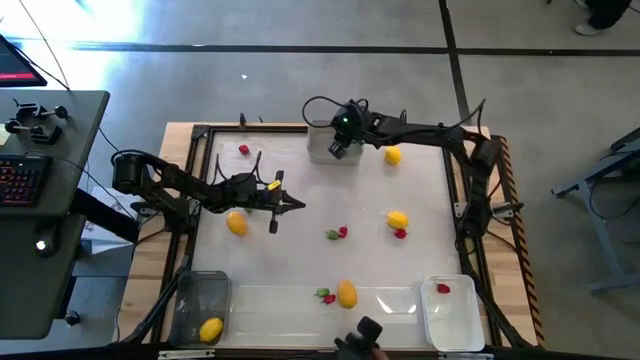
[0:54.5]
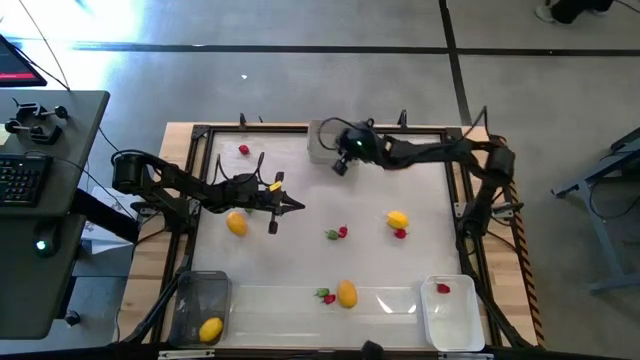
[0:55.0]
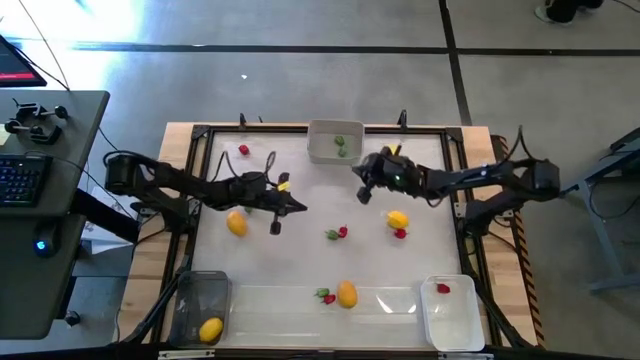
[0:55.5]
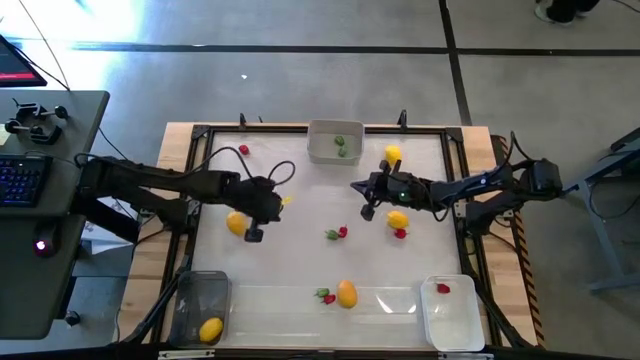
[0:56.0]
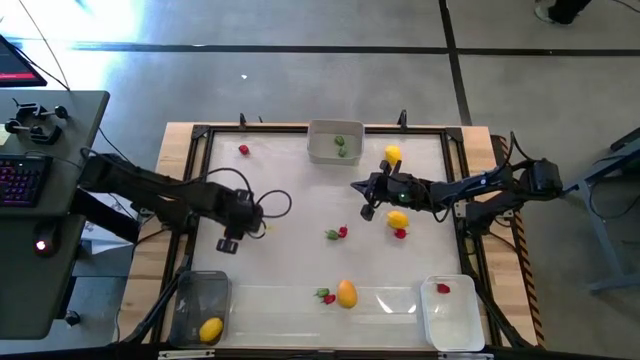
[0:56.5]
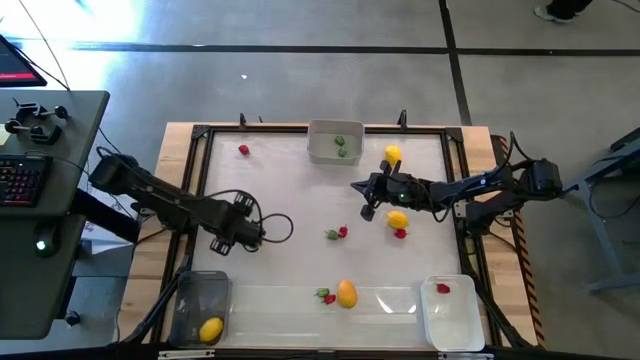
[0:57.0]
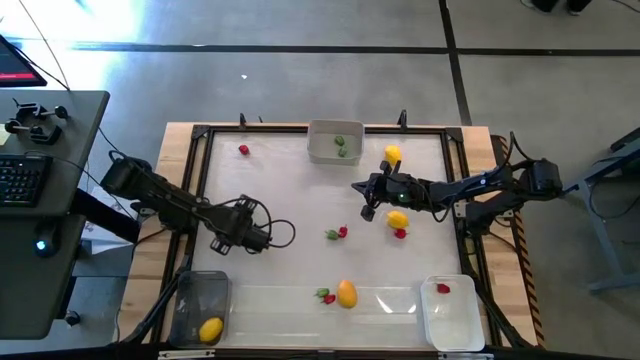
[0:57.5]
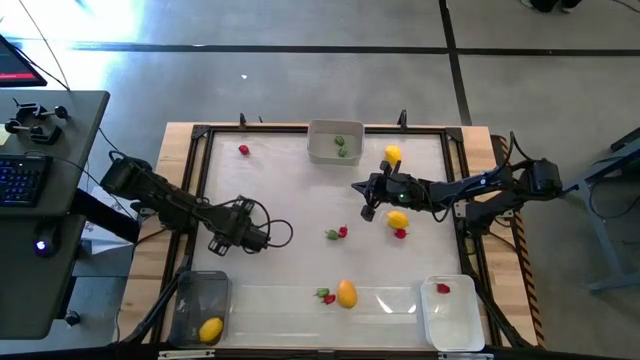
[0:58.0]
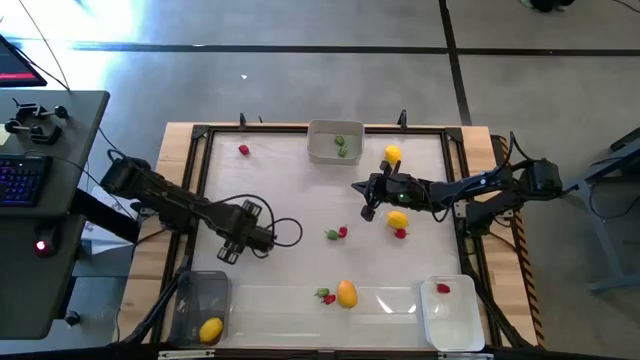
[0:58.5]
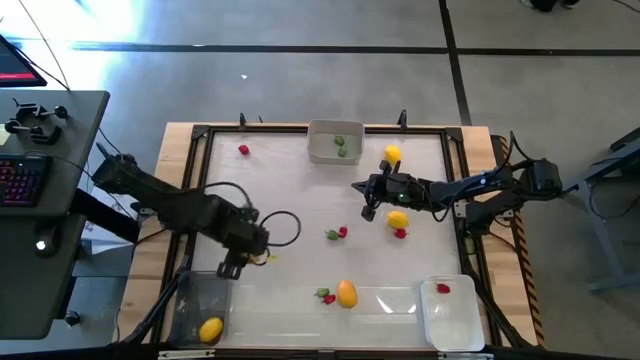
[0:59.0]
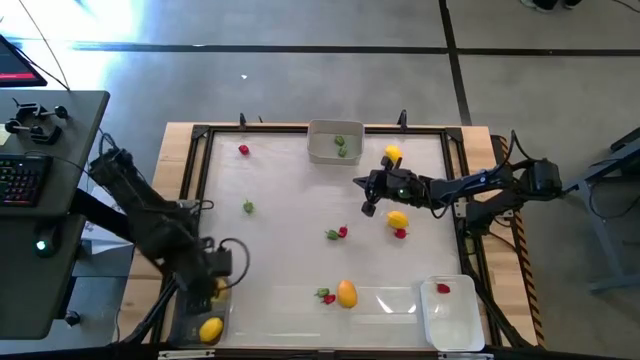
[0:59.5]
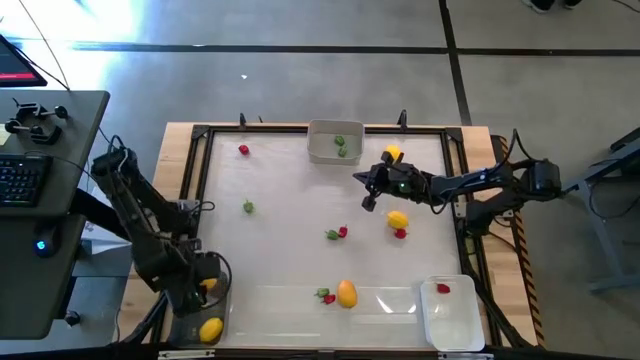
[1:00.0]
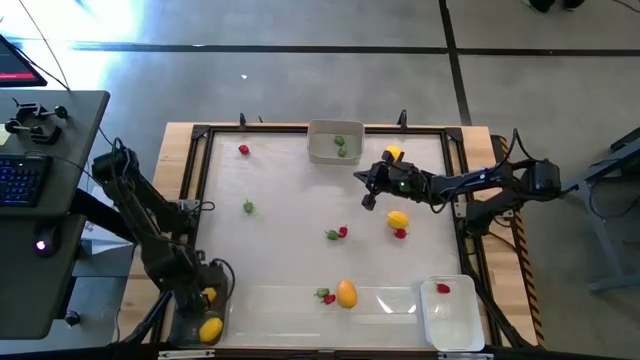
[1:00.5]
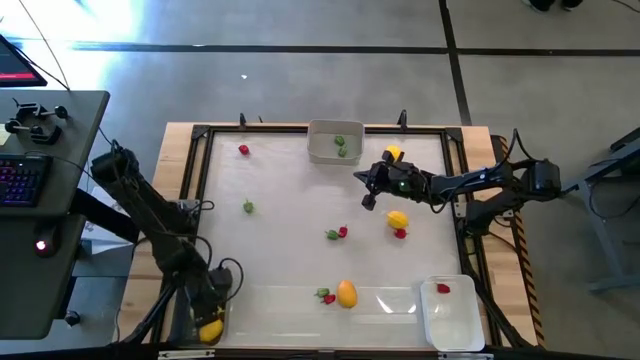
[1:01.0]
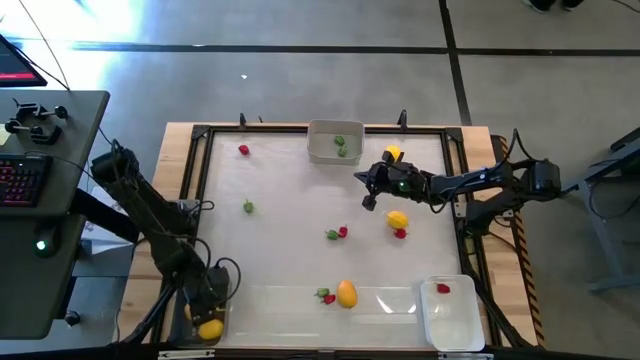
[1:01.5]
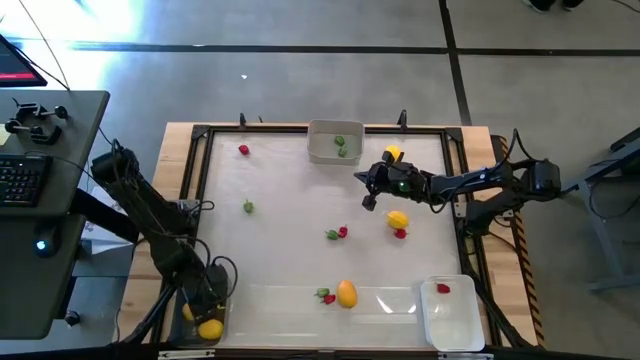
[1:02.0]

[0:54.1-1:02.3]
Task: Sort produce into baskets
Put the lemon into the black bin

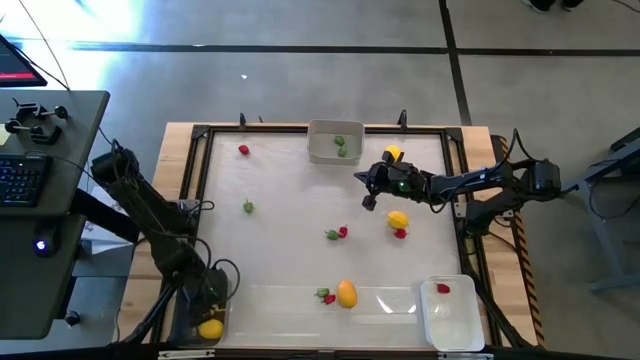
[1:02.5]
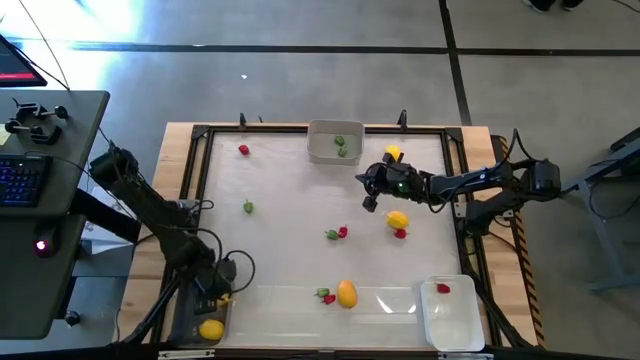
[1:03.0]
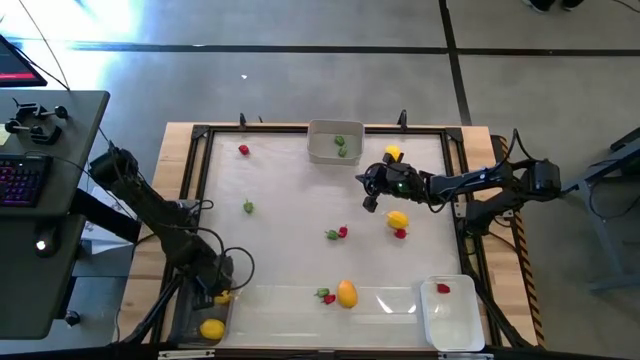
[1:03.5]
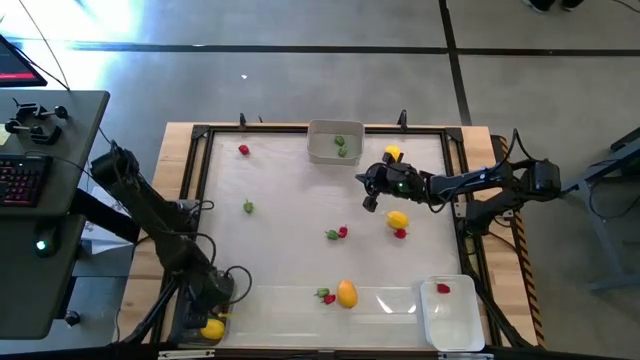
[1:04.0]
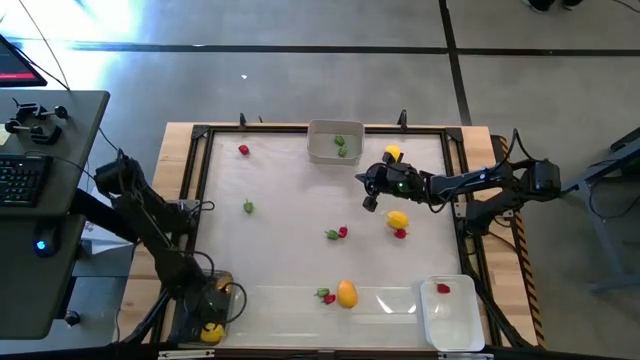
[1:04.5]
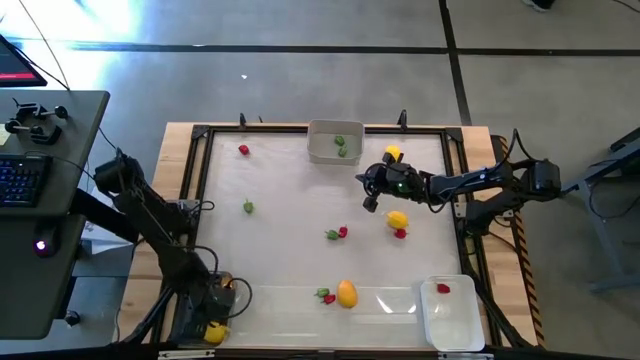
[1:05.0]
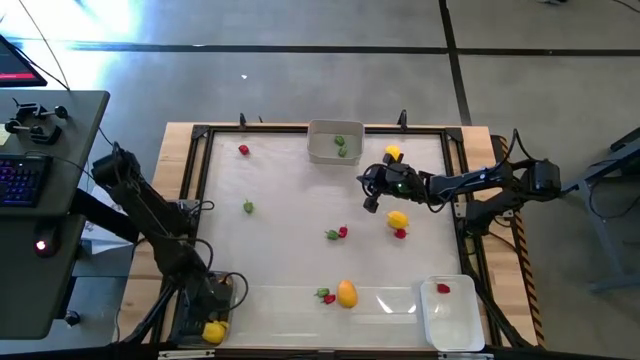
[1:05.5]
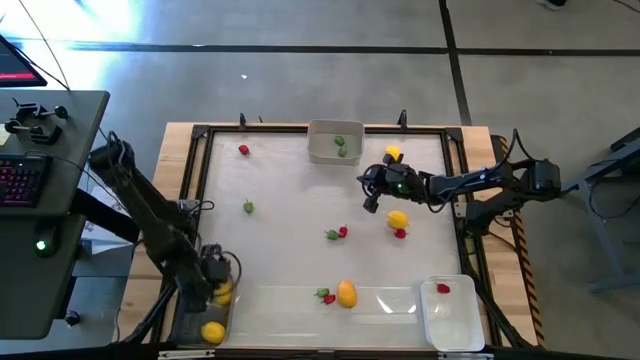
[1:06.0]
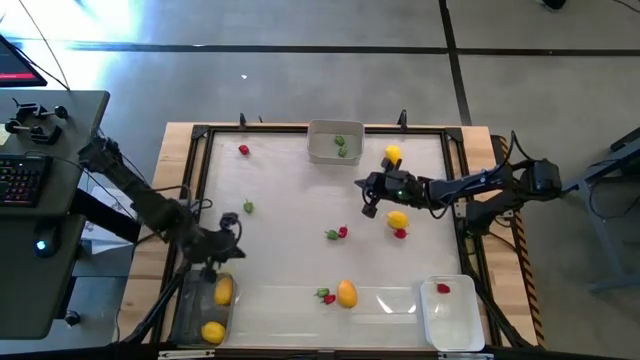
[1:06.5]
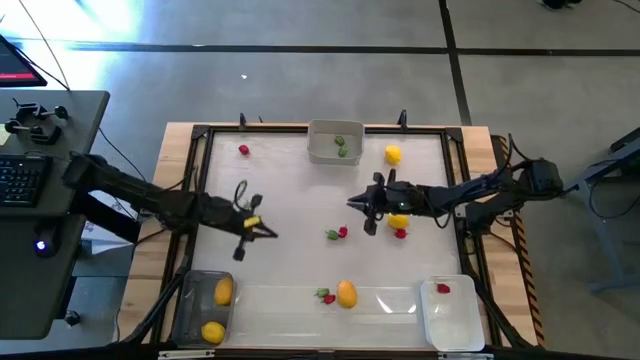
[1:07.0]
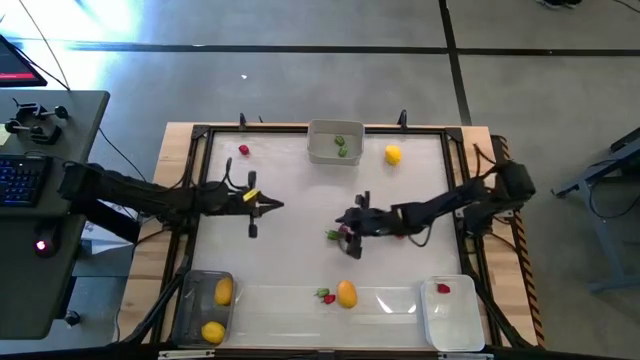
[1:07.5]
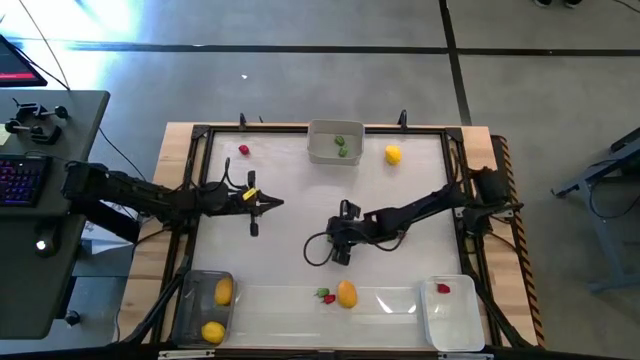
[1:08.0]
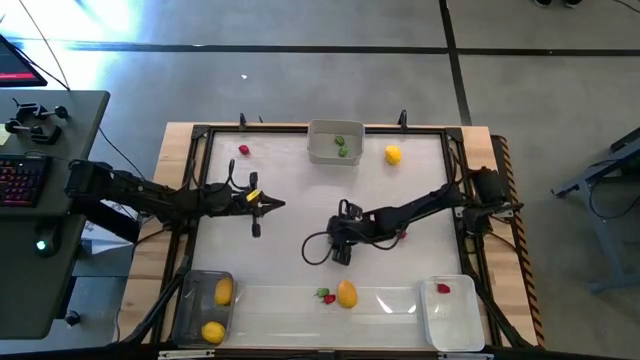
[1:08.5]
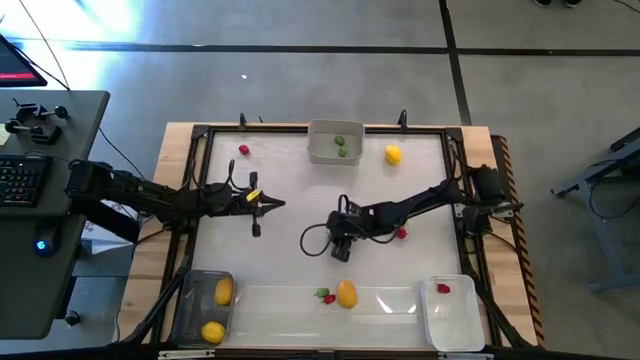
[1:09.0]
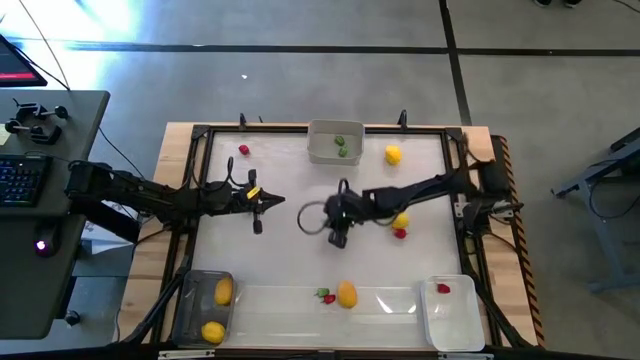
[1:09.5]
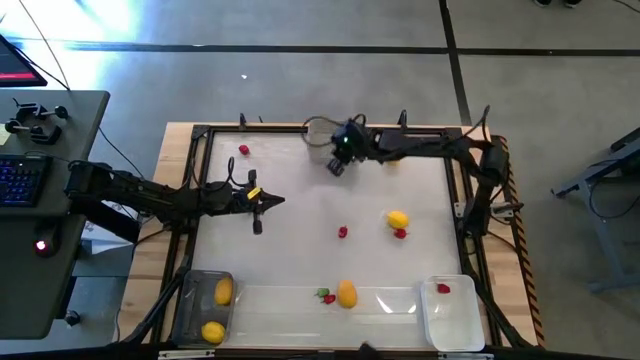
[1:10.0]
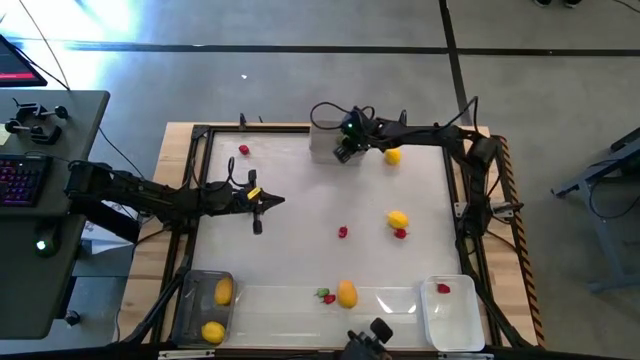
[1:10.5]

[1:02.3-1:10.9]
Put the green chili pepper into the gray bin

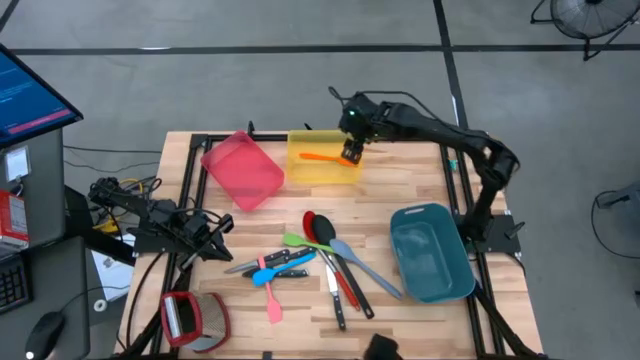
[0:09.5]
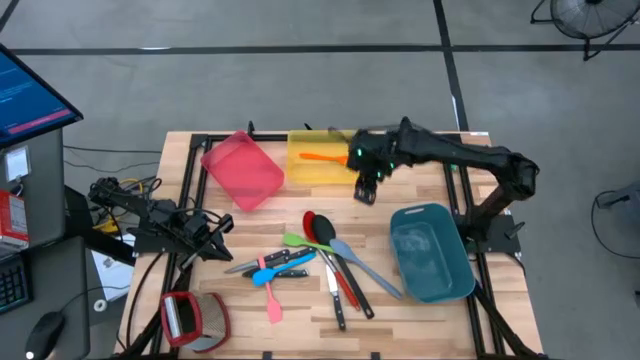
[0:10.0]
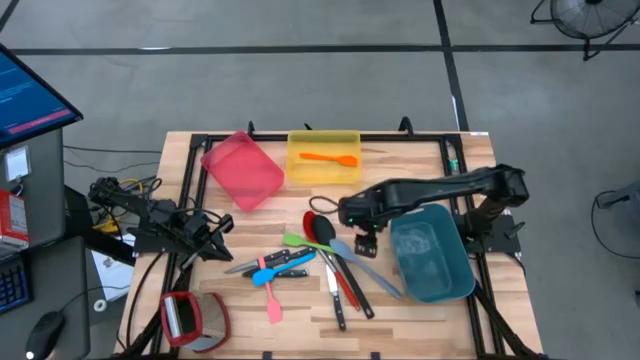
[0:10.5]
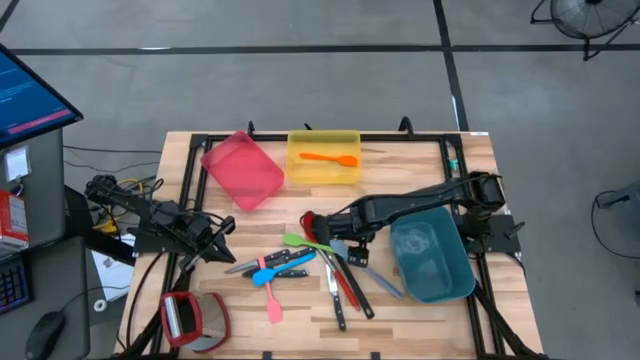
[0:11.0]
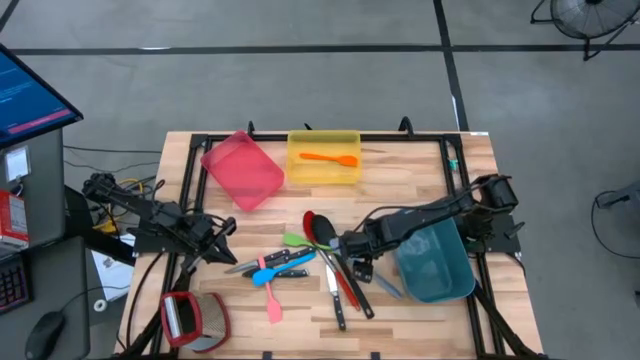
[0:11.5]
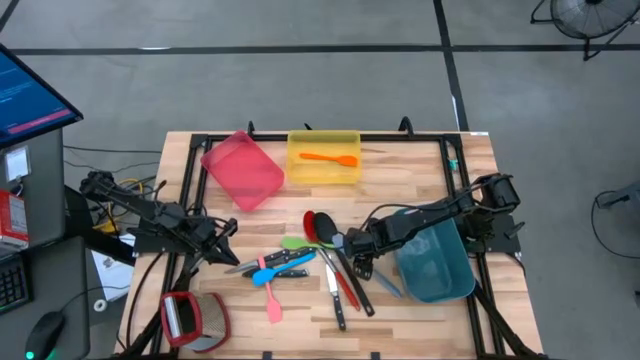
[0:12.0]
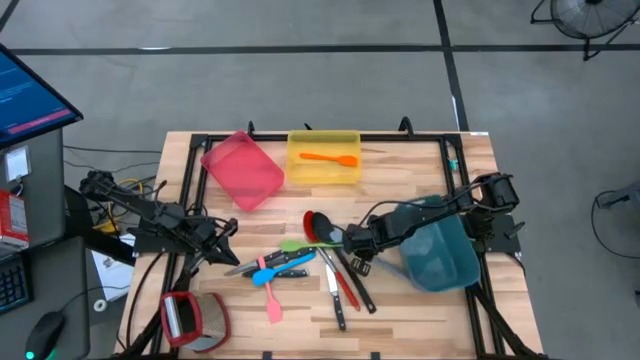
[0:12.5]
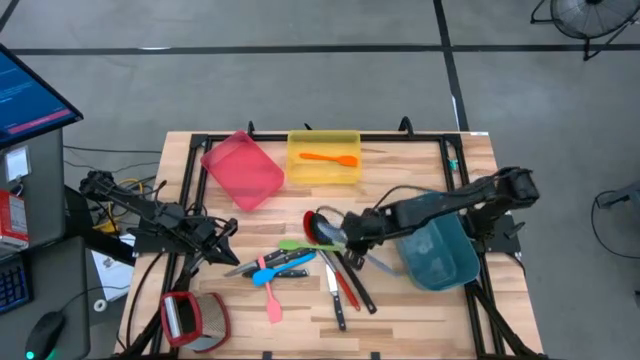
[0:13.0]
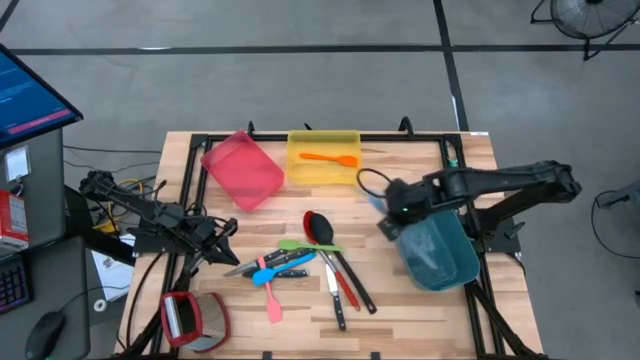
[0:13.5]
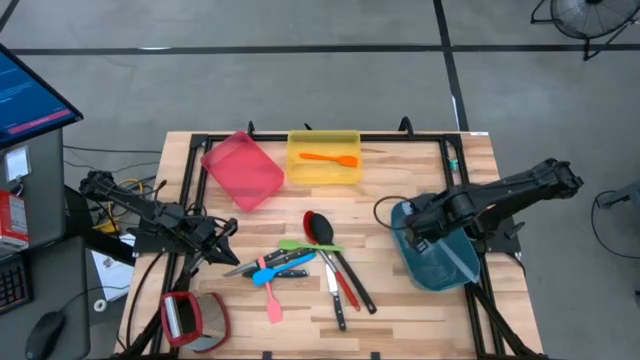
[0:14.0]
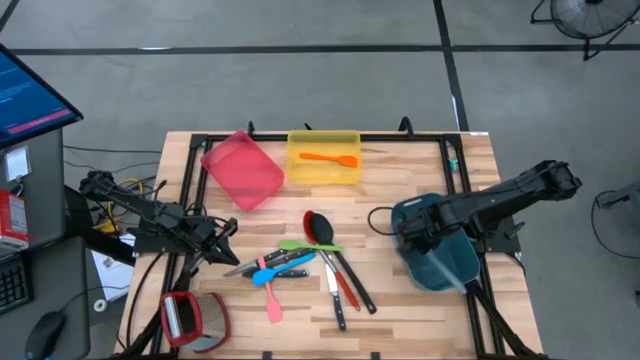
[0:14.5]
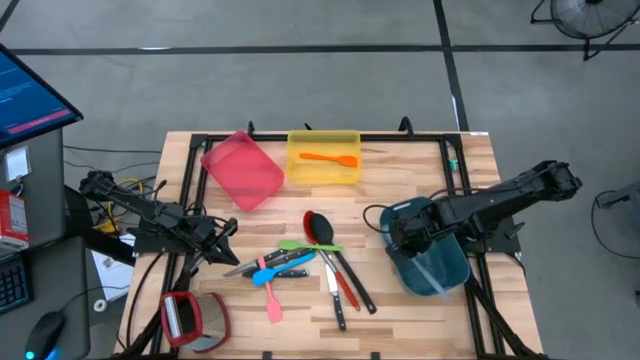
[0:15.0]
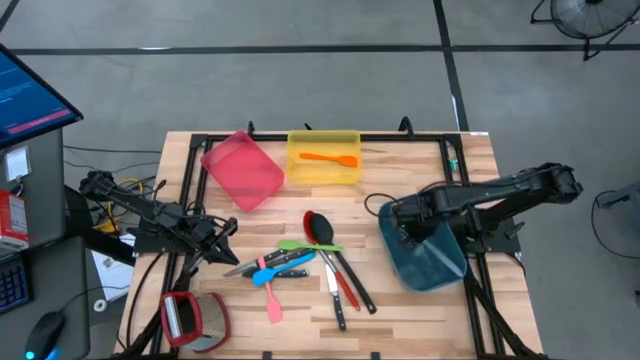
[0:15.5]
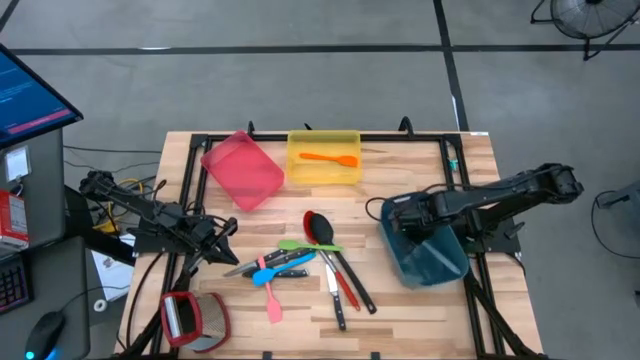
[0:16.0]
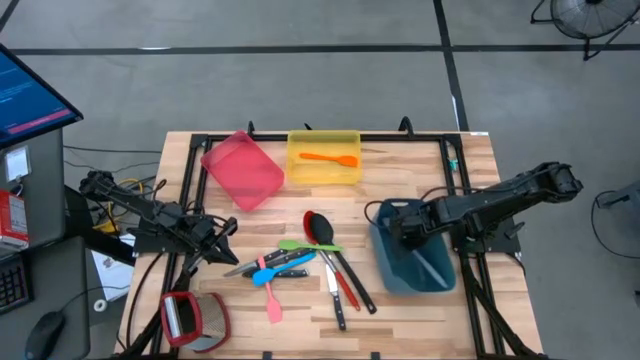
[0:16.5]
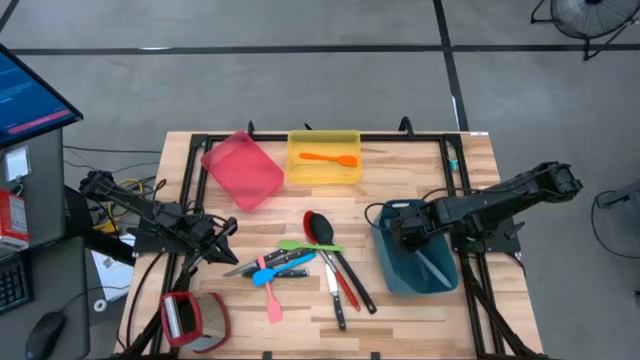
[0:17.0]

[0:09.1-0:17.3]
Task: Pick & Place Kitchen Items
Put the light blue serving spoon into the dark blue bin
